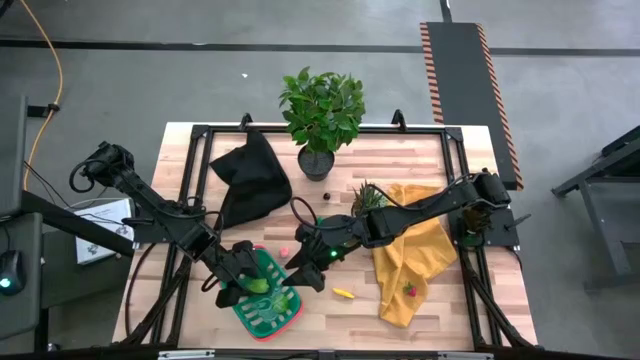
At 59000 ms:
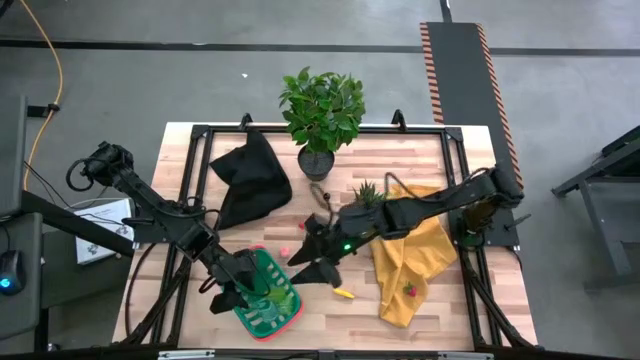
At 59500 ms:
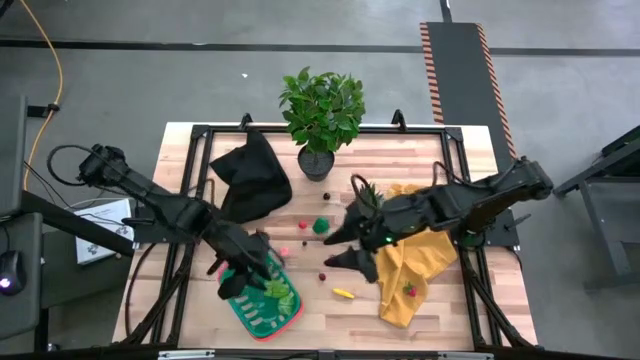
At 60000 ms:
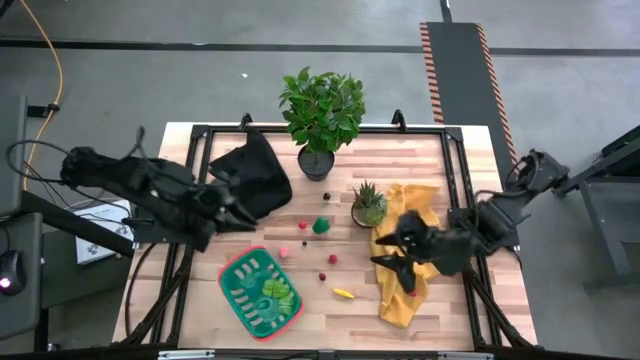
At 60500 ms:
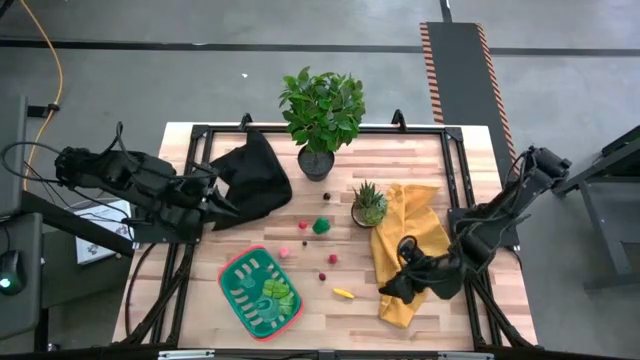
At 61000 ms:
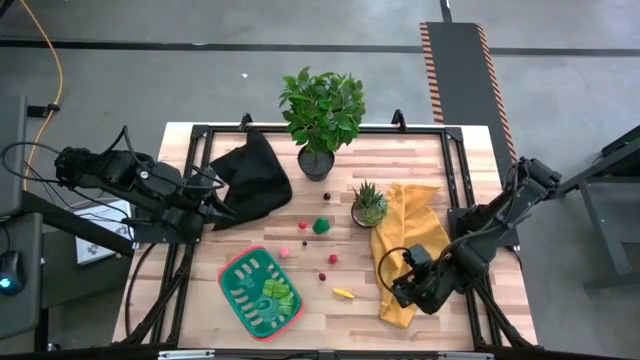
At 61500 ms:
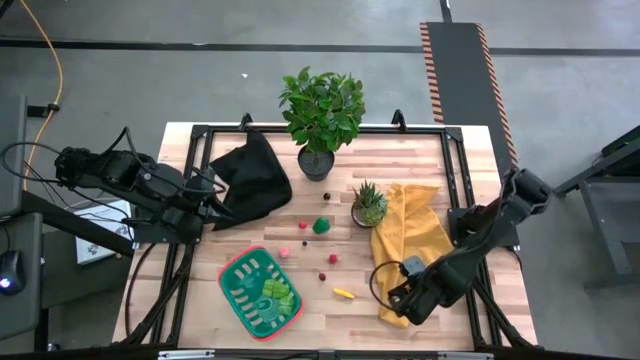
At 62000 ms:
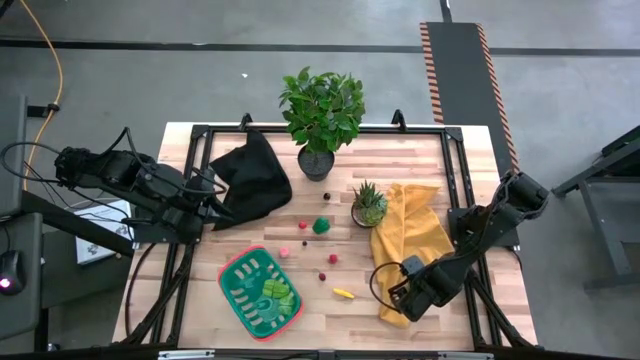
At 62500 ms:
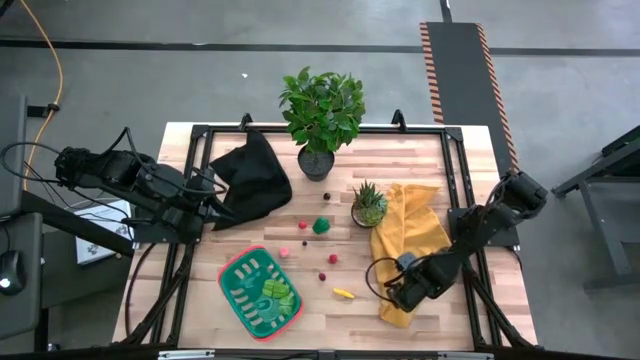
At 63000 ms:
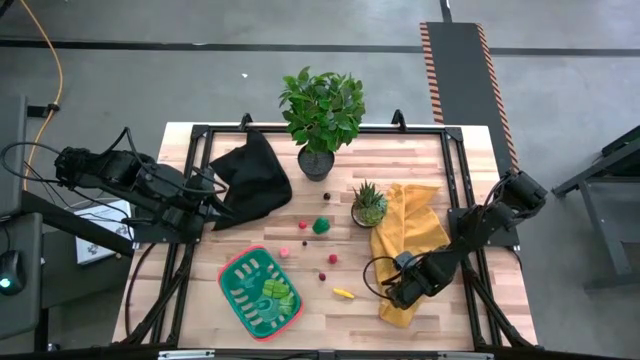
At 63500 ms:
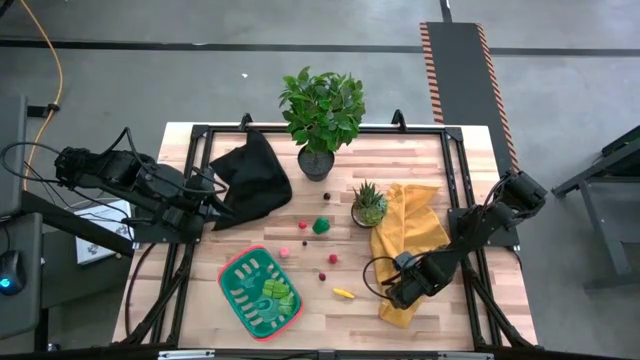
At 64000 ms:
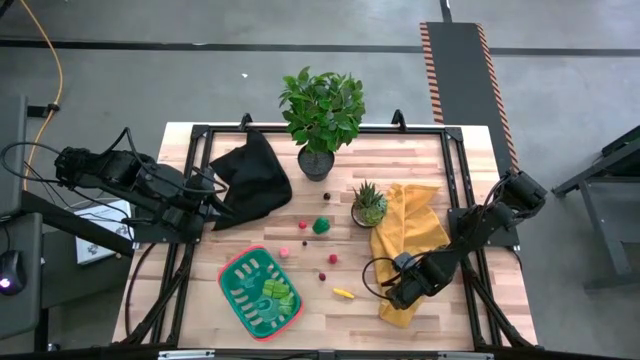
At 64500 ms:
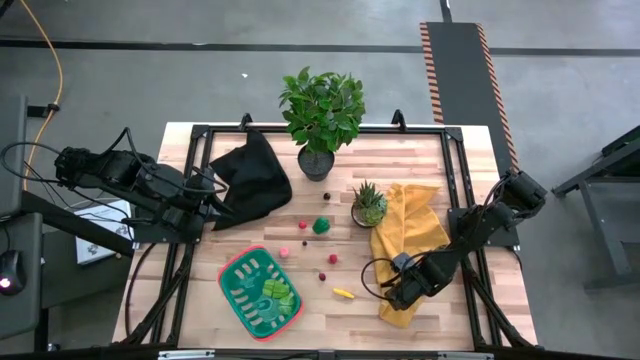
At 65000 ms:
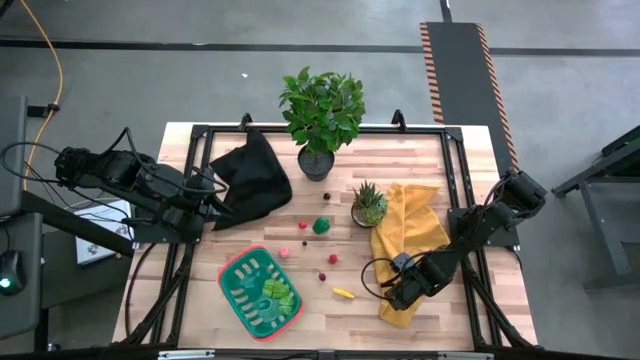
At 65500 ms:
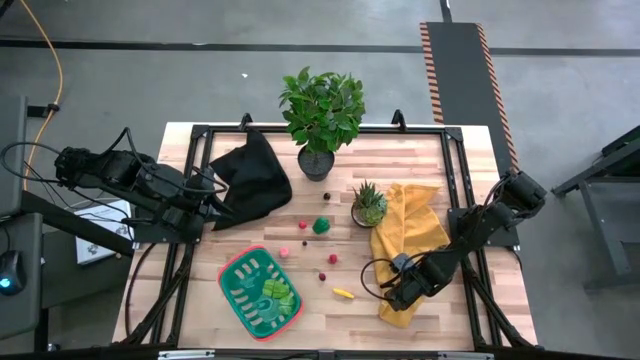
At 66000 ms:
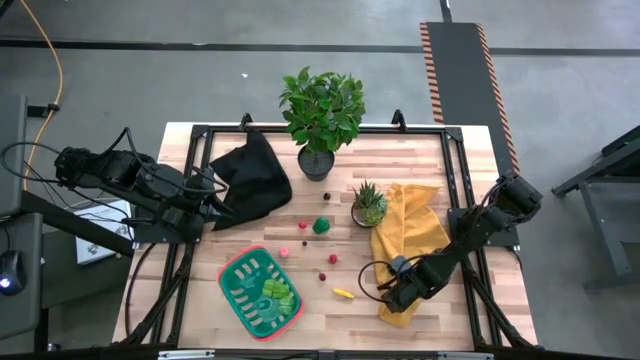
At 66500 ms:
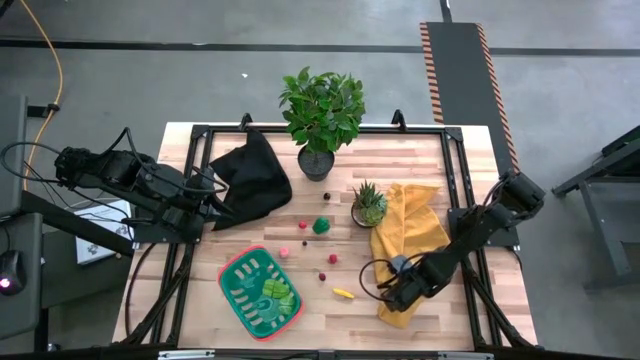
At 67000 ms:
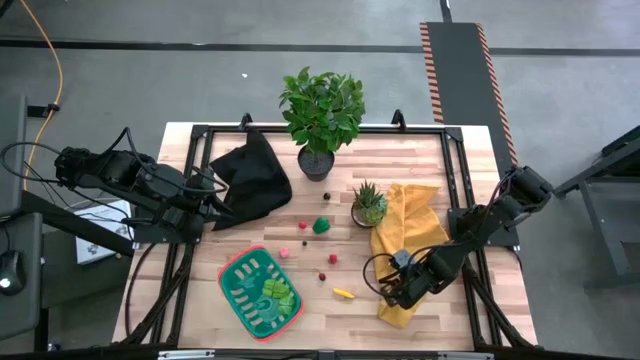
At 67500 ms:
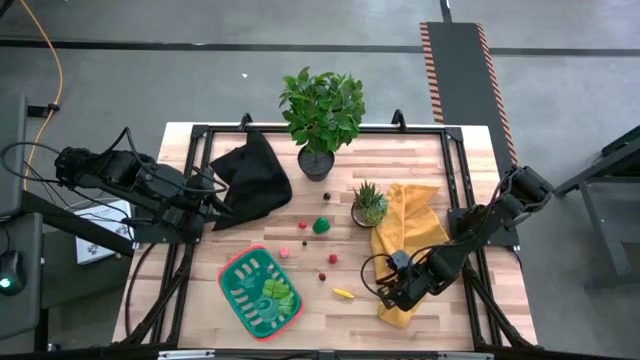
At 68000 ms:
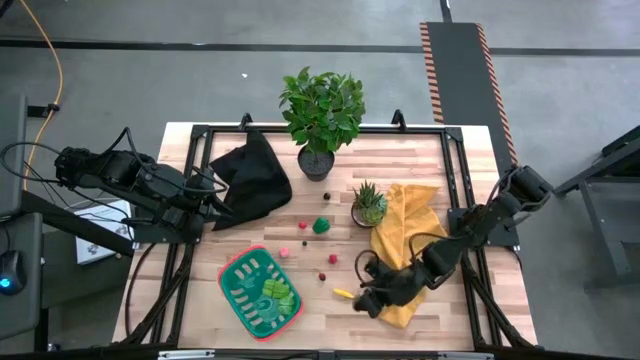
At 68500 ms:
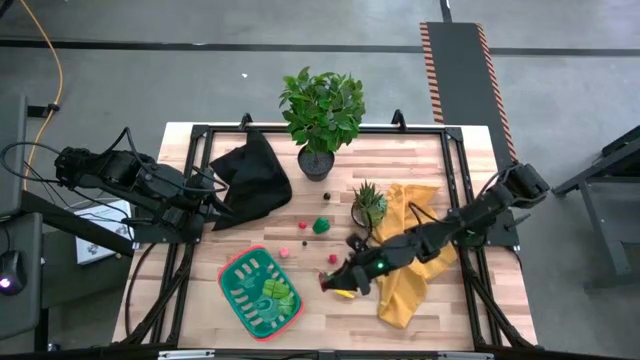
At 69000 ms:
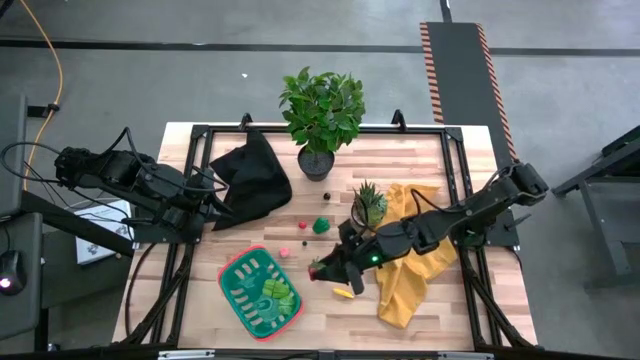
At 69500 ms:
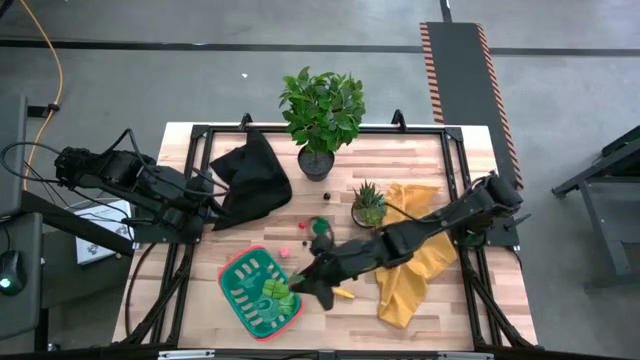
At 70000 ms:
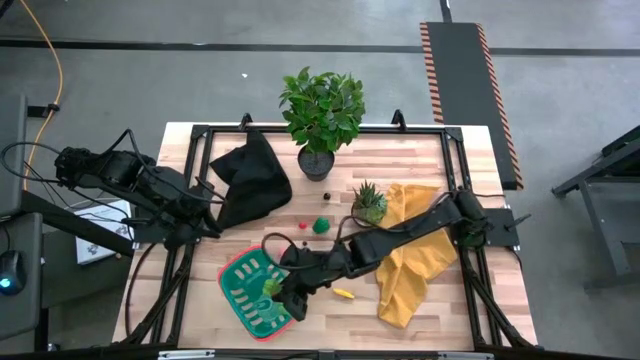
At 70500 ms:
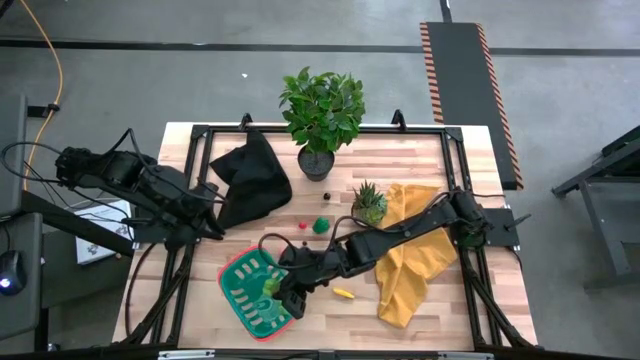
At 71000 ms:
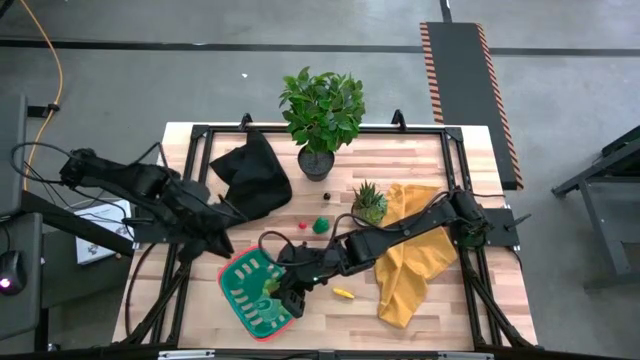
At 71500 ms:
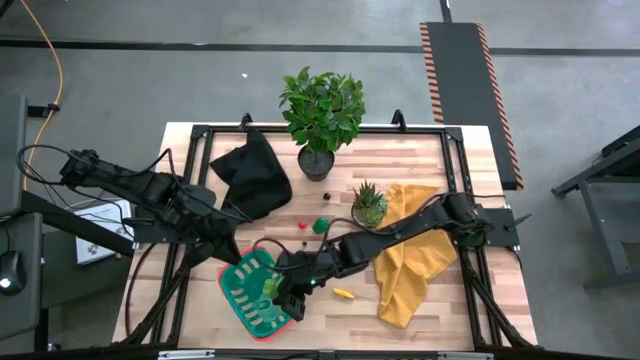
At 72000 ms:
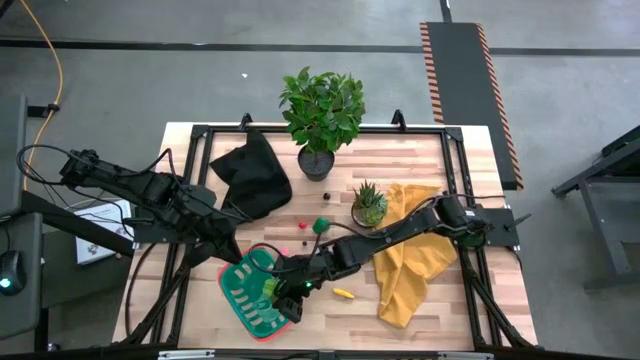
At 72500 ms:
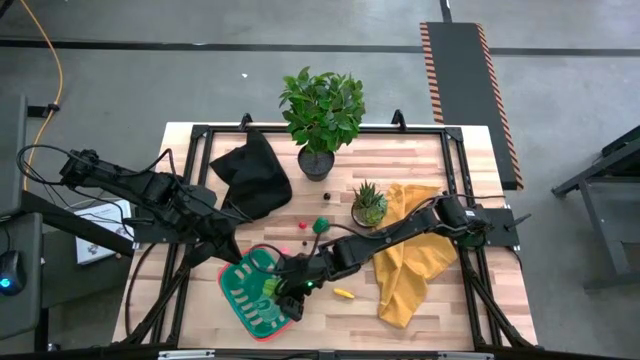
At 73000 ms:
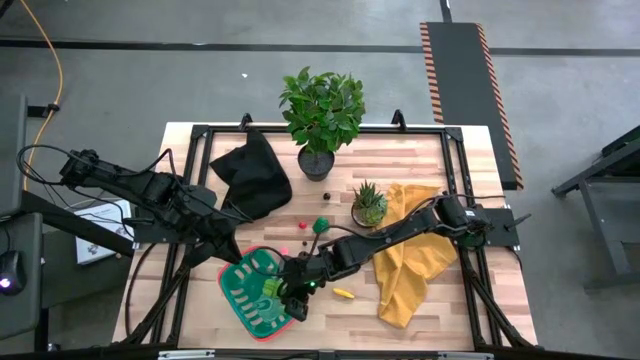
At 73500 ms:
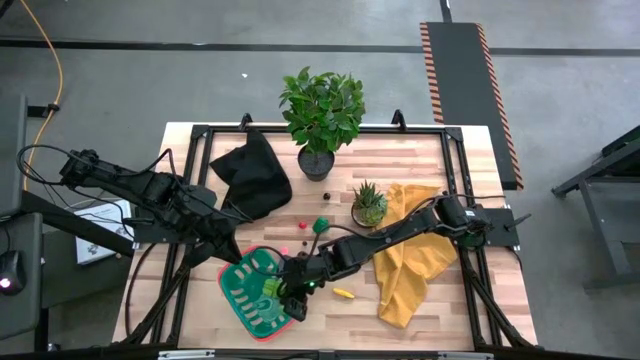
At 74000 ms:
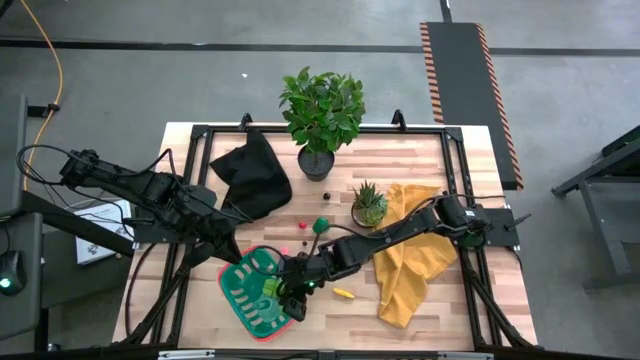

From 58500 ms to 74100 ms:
Task: Pick and placing Produce into tupperware
Put the red strawberry into the blue basket

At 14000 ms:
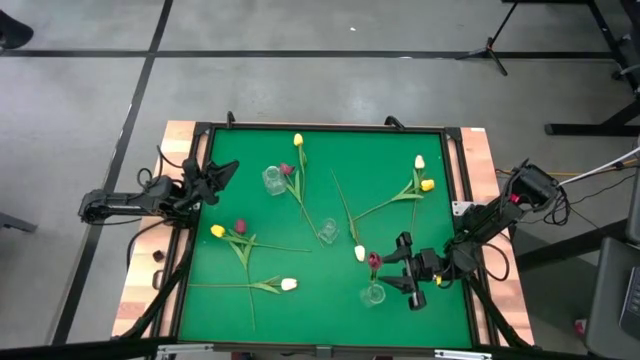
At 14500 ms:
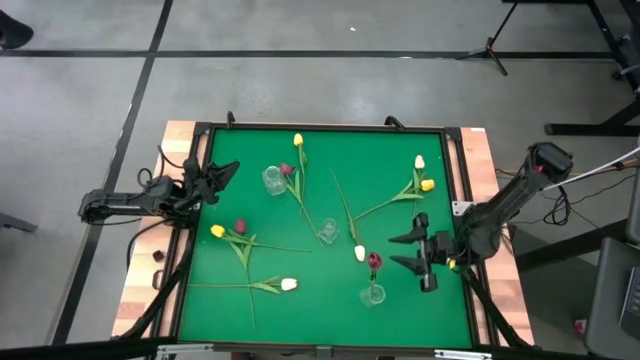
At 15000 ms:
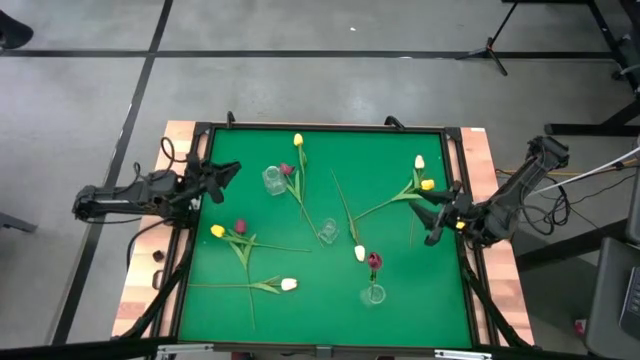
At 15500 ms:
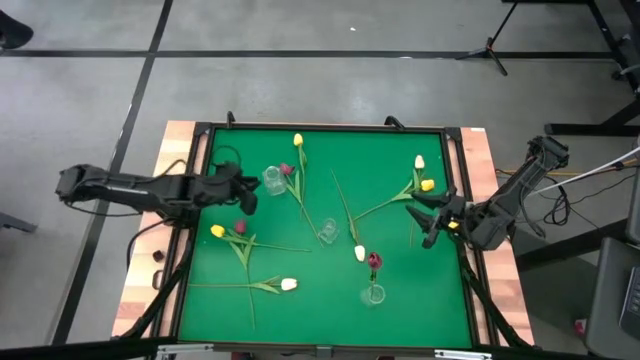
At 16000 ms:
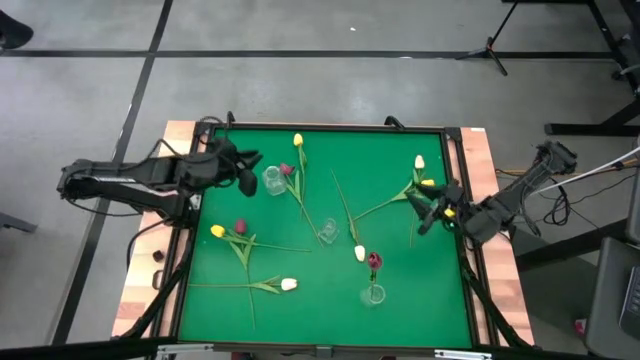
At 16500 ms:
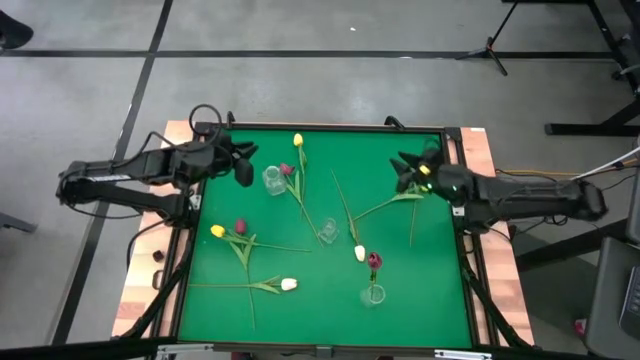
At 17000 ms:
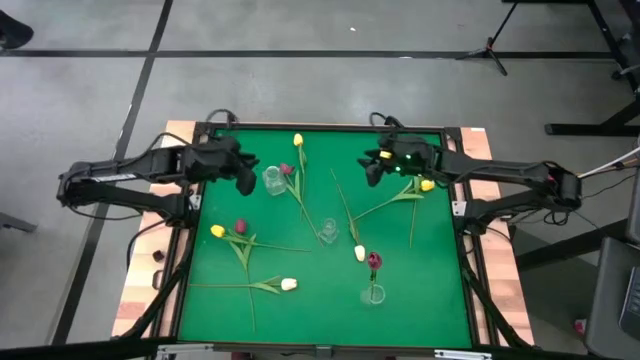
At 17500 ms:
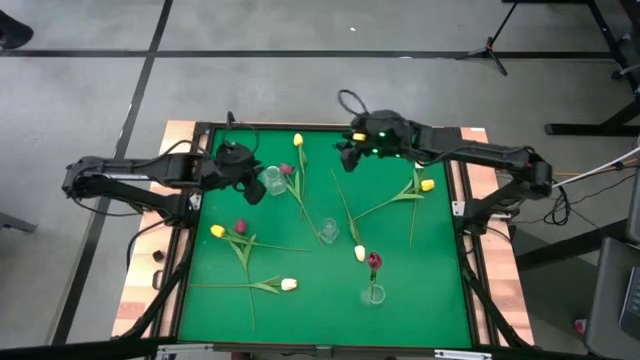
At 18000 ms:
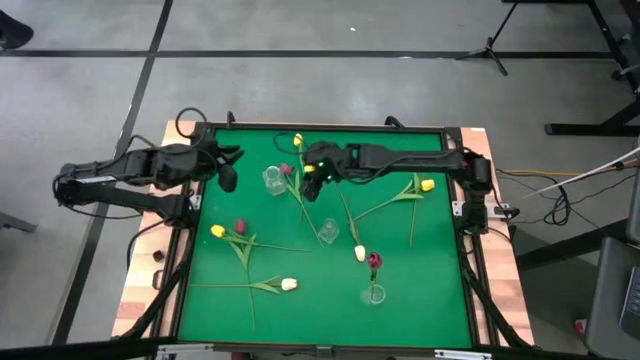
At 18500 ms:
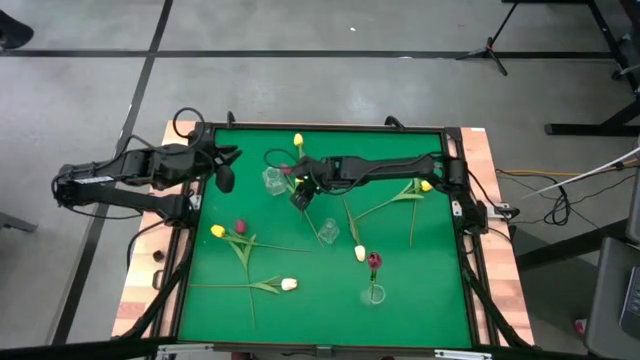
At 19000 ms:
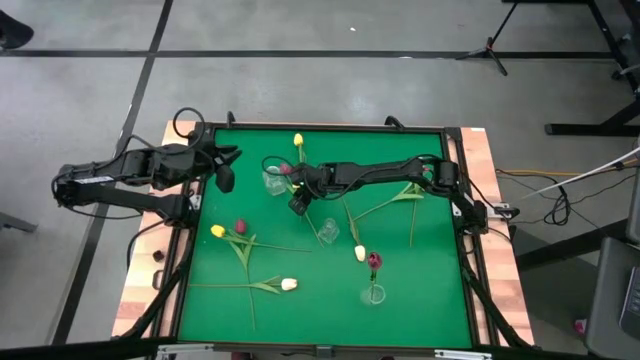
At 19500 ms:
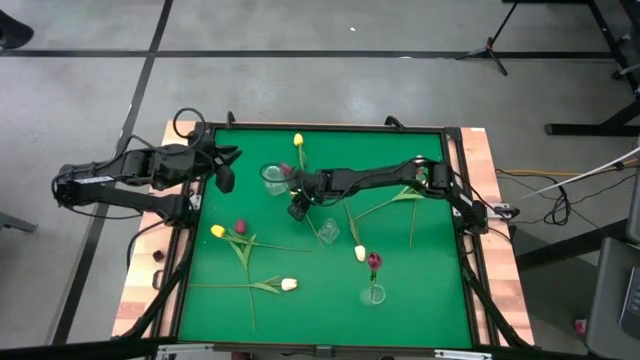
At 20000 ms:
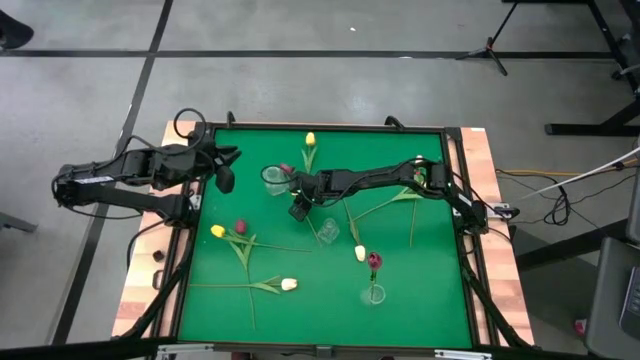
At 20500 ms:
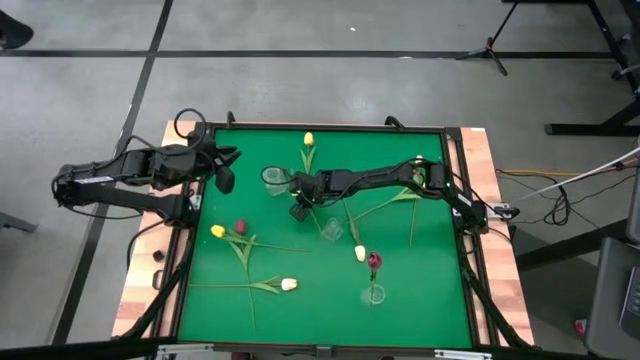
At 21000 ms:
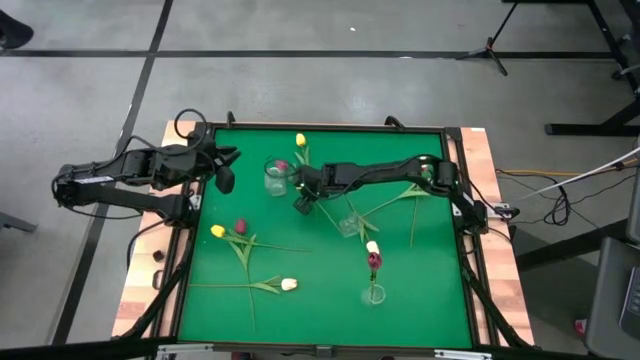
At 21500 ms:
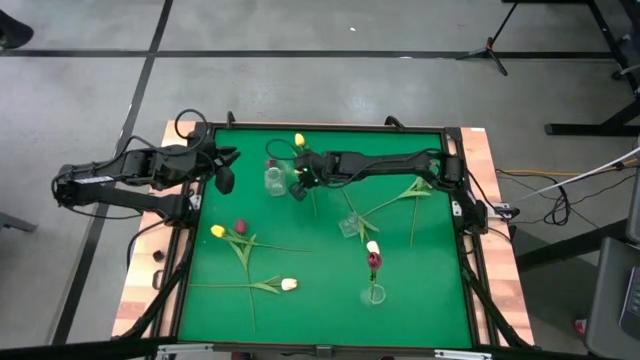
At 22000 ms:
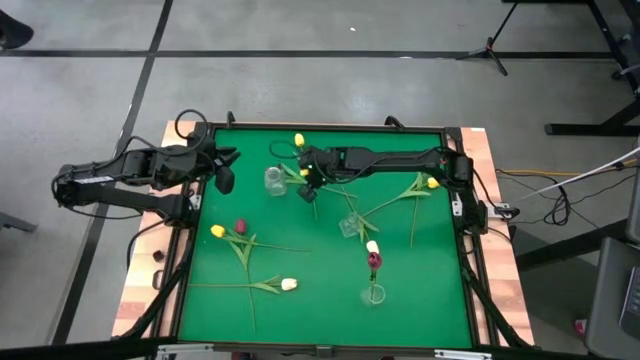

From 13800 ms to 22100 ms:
Task: Sort flowers into vase by color
Put the top red tulip into the bottom right transparent vase
